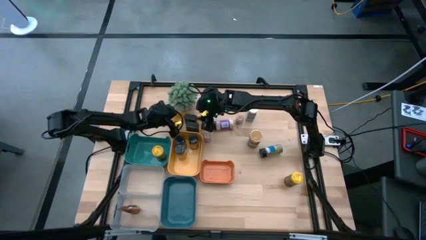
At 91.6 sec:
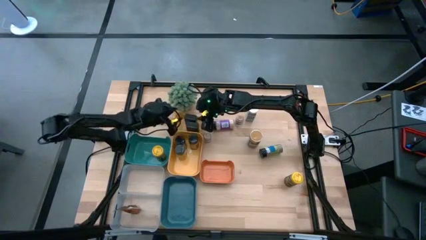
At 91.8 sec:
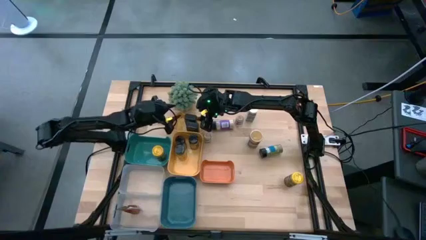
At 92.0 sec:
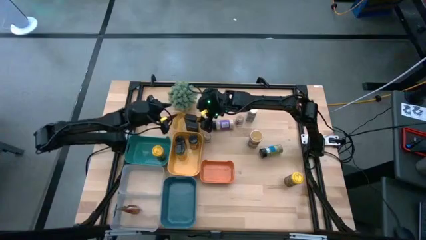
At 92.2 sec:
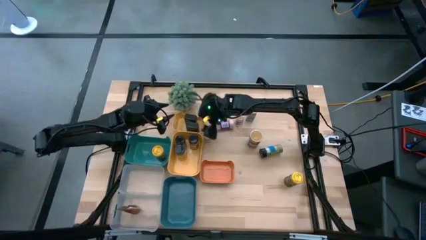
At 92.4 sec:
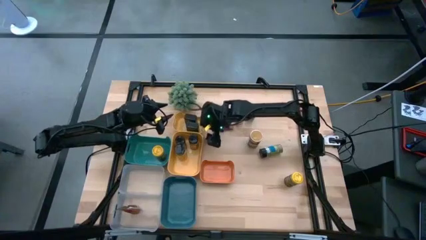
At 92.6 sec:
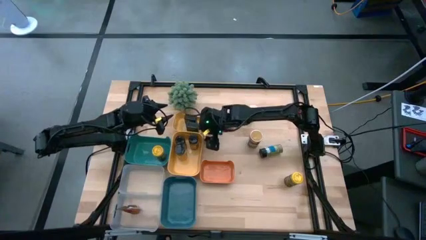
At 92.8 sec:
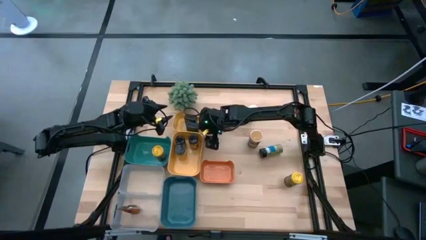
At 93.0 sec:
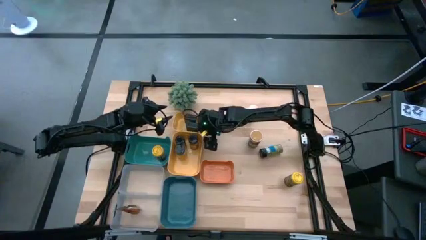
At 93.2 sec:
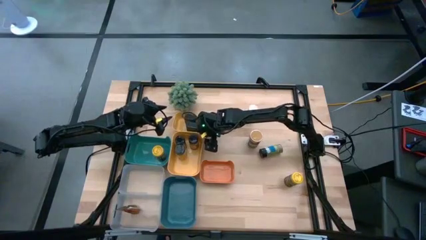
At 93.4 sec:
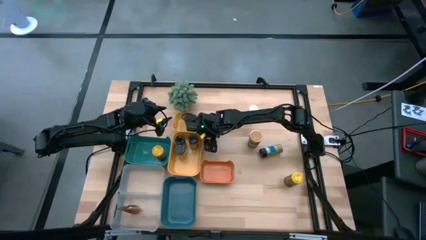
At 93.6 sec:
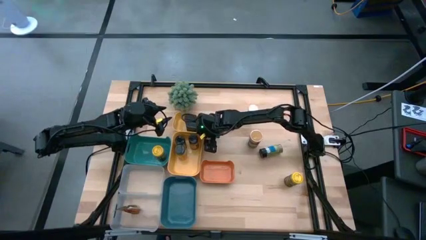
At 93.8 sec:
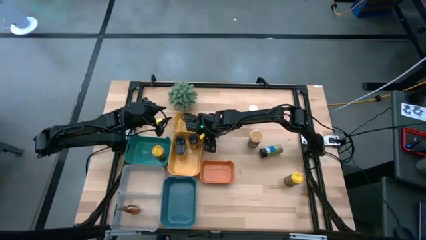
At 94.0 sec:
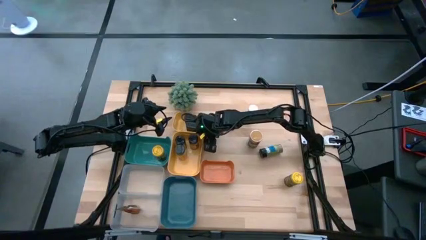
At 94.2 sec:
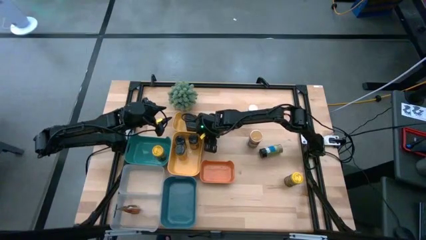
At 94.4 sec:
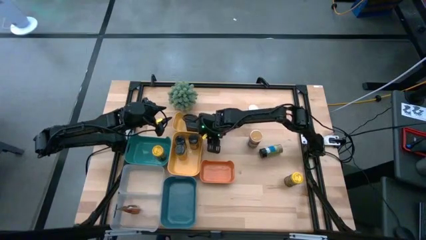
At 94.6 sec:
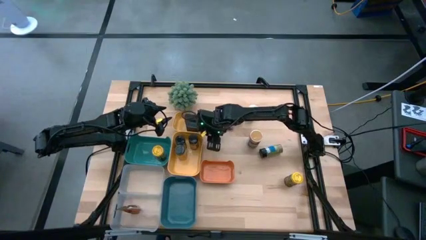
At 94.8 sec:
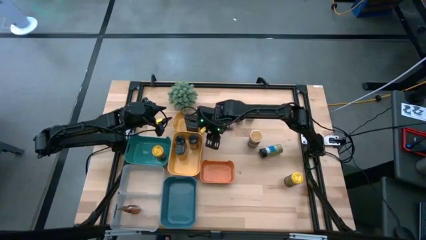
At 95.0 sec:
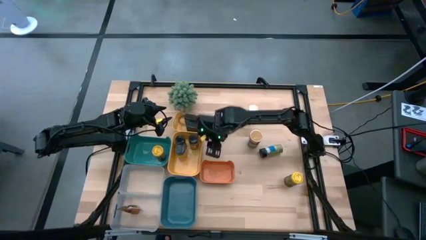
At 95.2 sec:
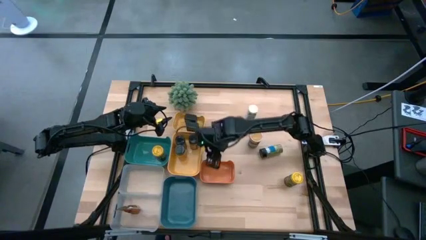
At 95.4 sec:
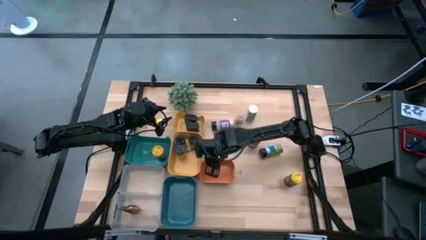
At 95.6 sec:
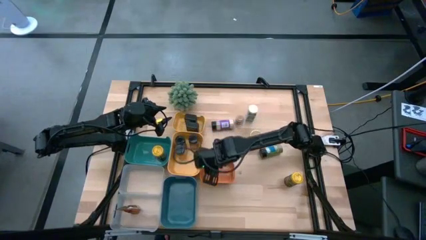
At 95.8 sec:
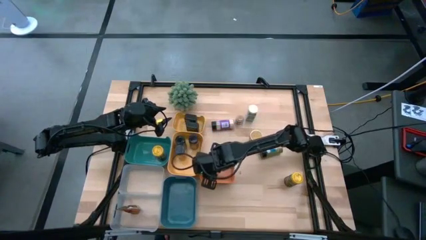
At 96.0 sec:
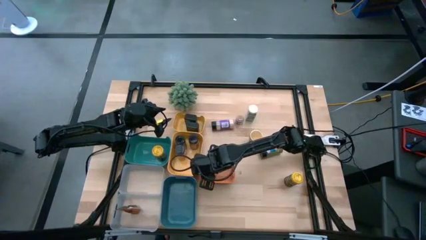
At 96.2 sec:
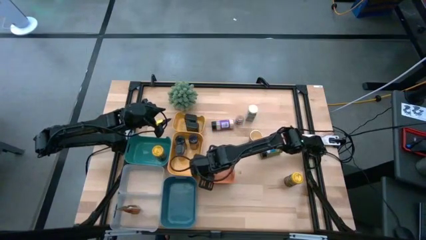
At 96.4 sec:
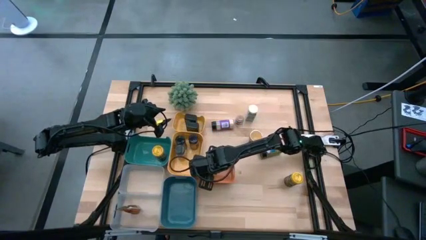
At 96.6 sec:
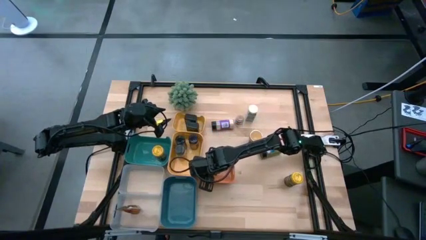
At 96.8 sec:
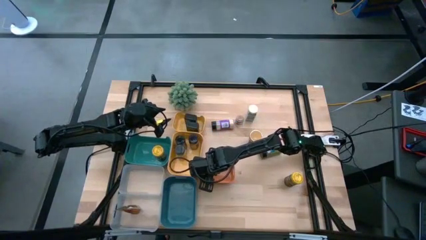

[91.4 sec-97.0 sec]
Task: Sort spices by type
Put the brown seasoning bottle into the orange bin

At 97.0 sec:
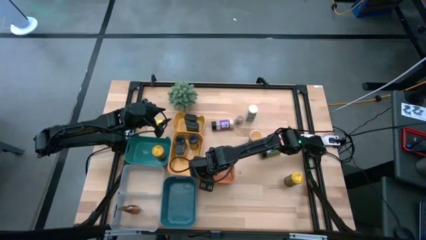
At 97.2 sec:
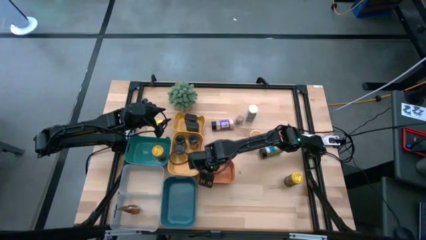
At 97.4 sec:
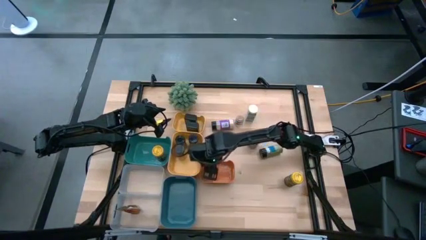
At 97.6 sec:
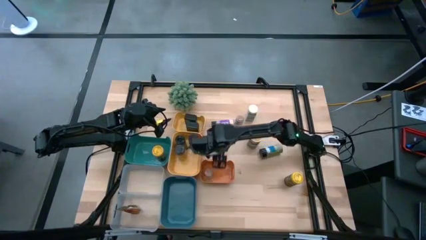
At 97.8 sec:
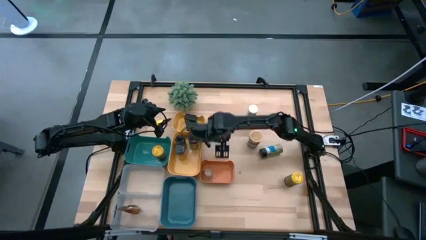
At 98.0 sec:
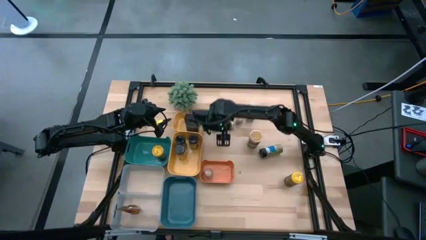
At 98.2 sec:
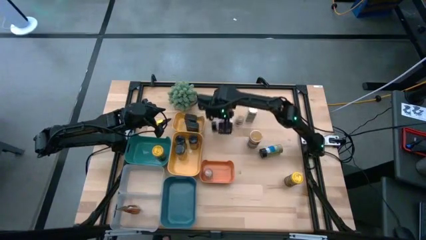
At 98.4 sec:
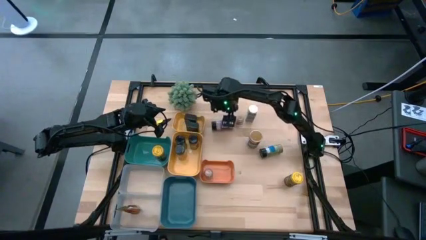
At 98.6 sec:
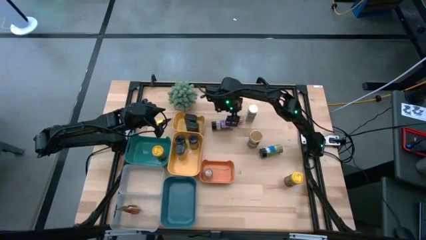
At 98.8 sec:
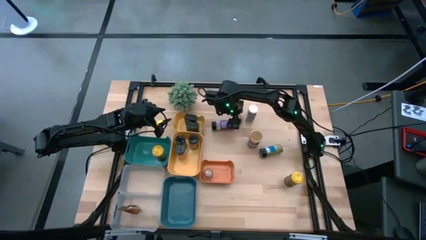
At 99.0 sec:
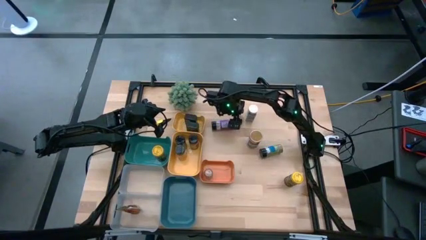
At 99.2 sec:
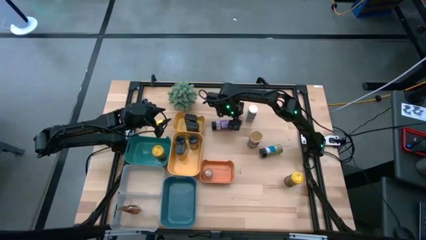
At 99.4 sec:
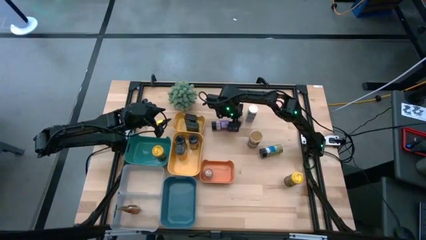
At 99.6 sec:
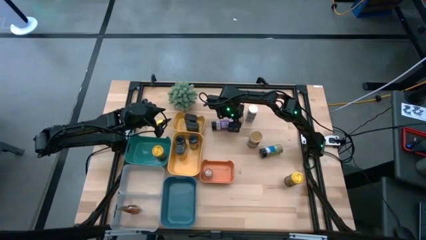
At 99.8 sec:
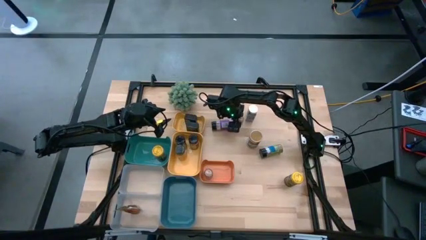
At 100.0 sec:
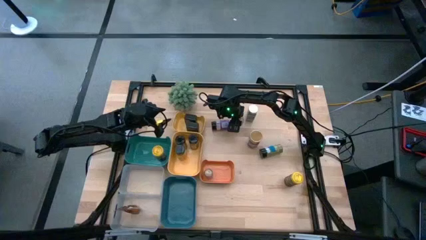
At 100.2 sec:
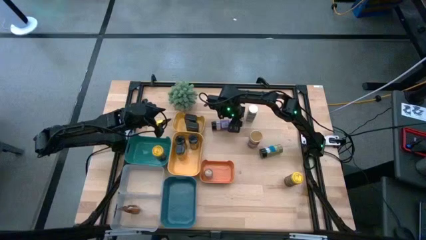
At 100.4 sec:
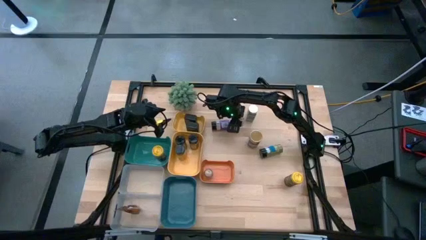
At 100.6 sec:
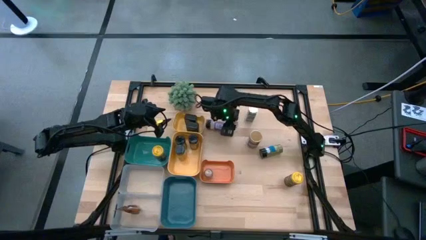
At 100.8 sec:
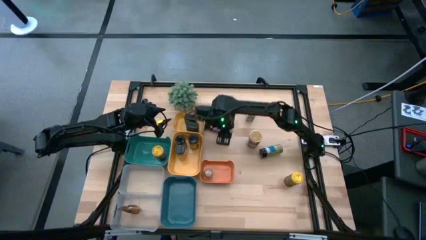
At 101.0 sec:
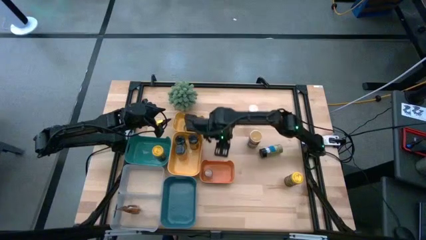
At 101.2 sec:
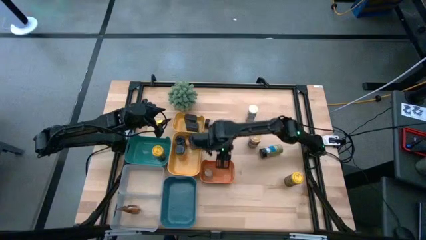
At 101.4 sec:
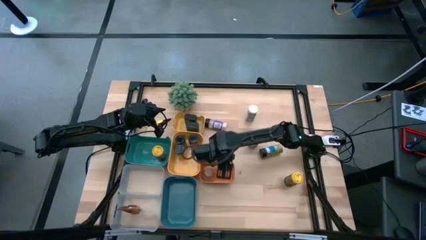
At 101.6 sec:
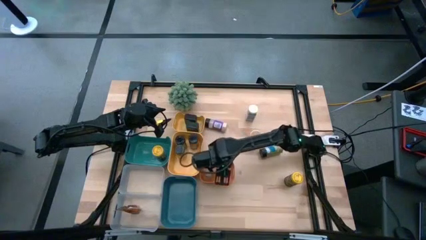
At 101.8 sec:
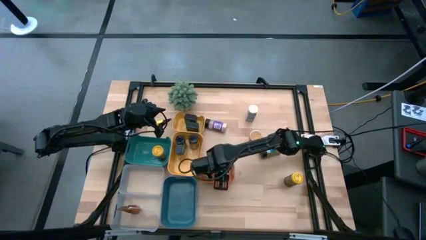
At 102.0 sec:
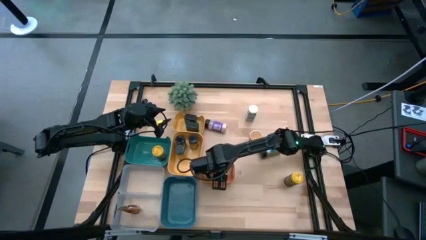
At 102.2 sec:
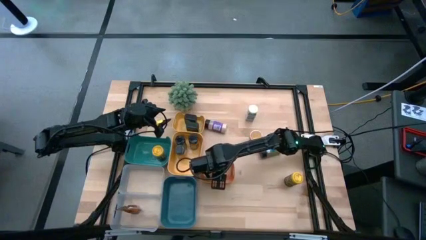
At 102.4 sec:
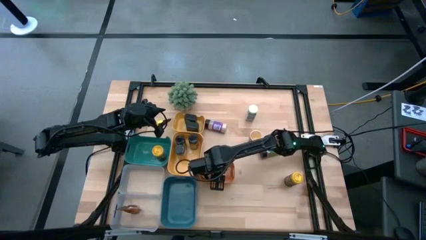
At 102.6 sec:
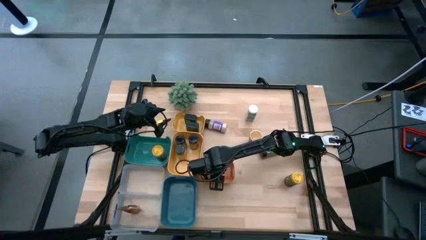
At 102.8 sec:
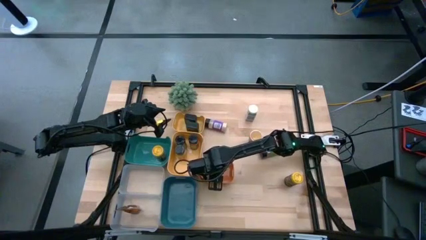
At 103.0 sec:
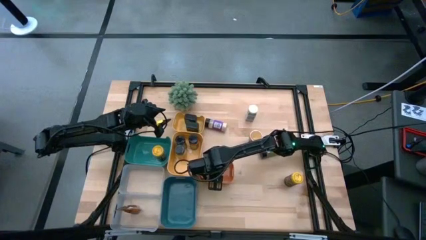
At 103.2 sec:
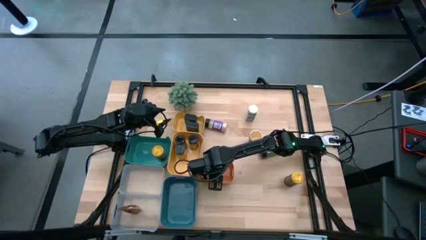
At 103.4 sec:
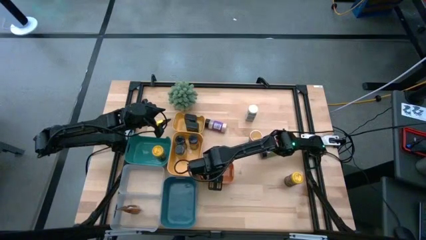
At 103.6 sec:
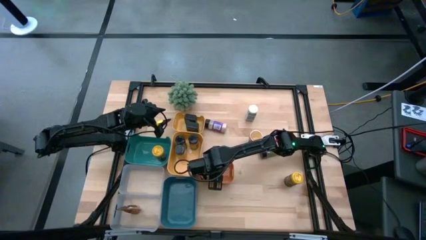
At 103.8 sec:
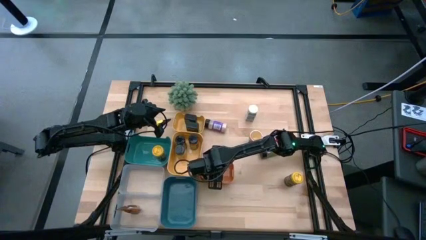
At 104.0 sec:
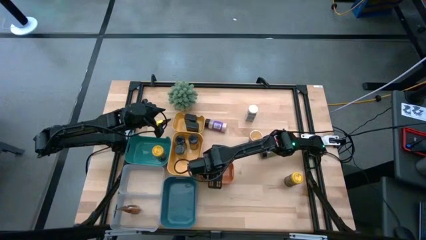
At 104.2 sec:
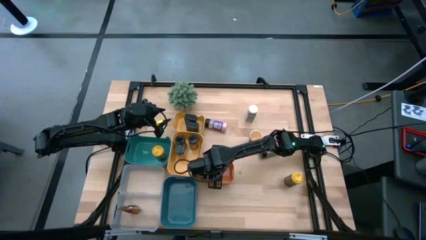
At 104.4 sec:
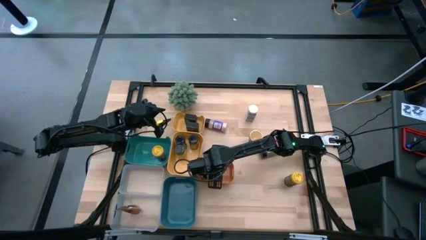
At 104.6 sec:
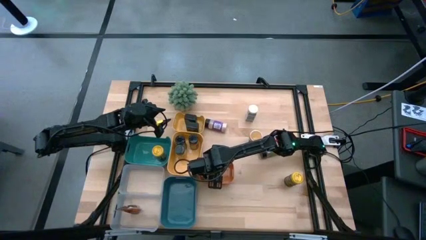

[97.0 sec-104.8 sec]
Put the brown seasoning bottle into the orange bin
